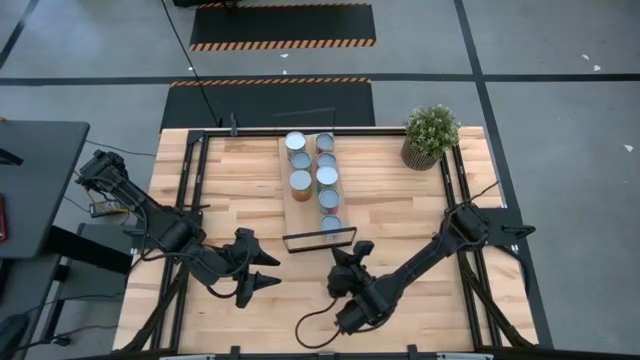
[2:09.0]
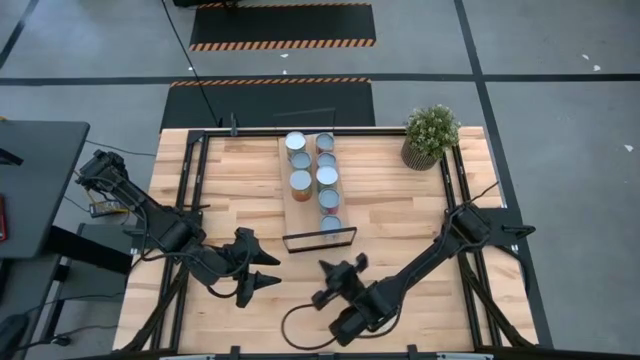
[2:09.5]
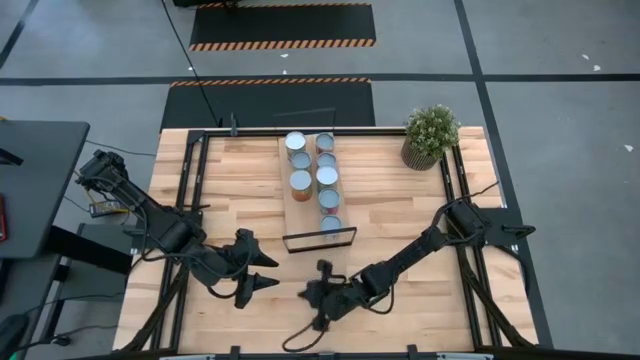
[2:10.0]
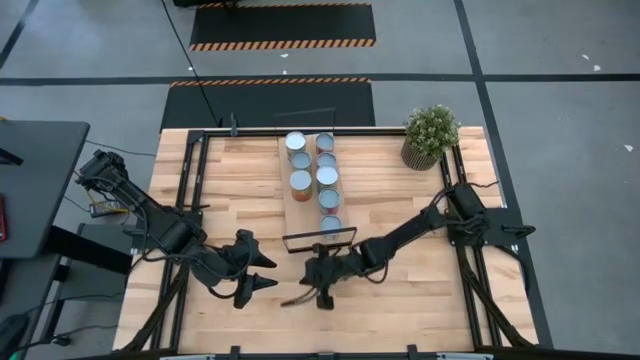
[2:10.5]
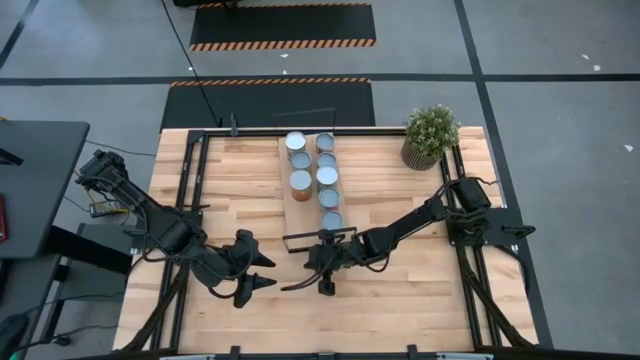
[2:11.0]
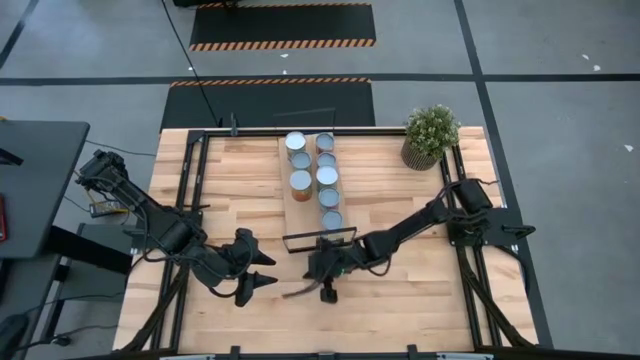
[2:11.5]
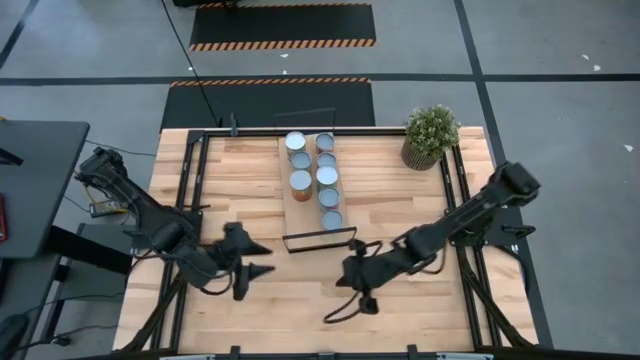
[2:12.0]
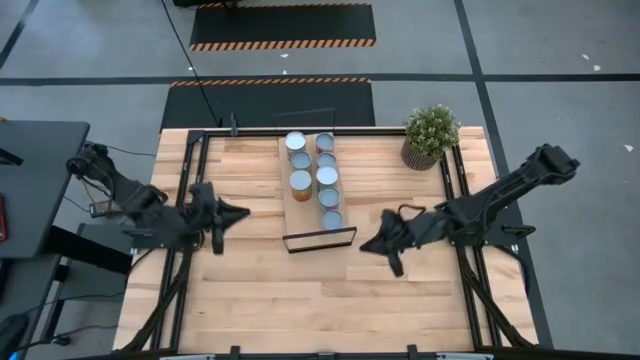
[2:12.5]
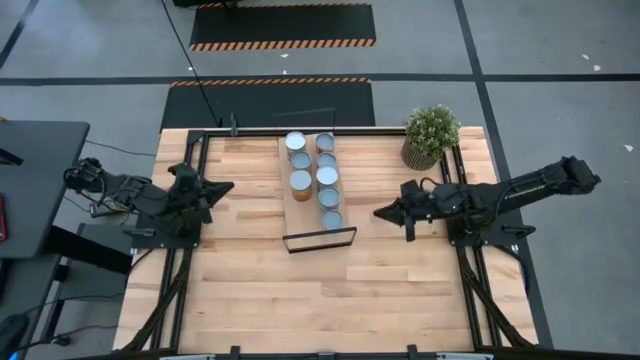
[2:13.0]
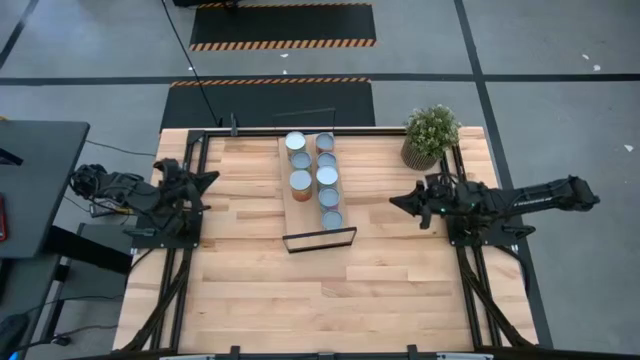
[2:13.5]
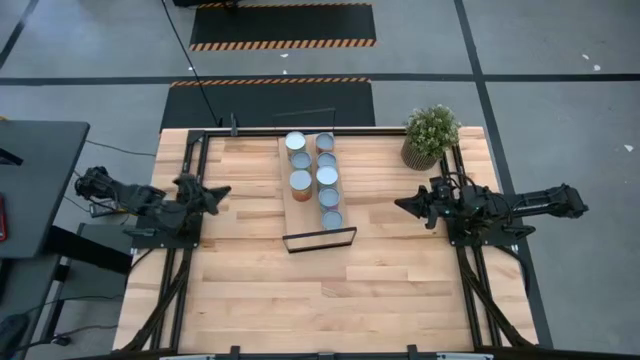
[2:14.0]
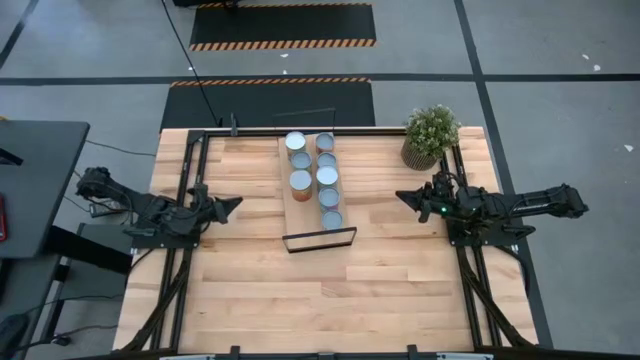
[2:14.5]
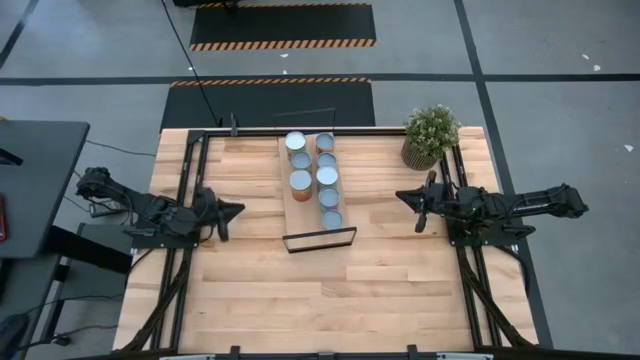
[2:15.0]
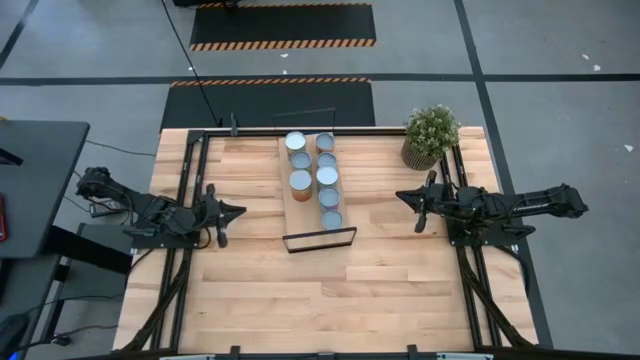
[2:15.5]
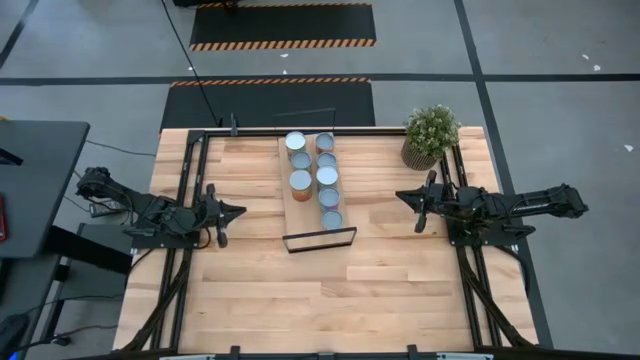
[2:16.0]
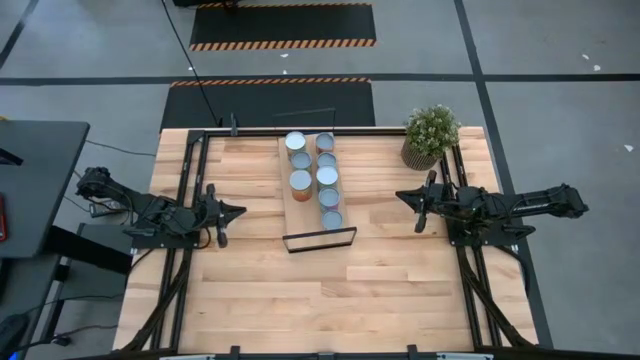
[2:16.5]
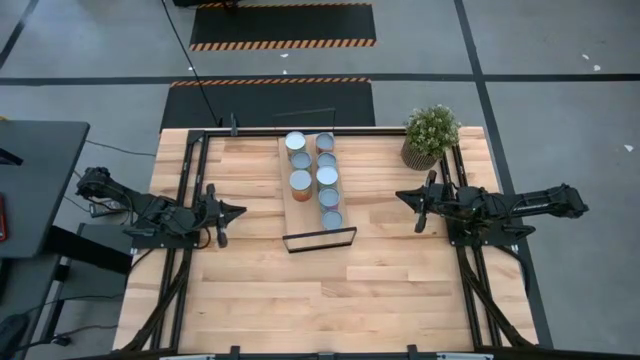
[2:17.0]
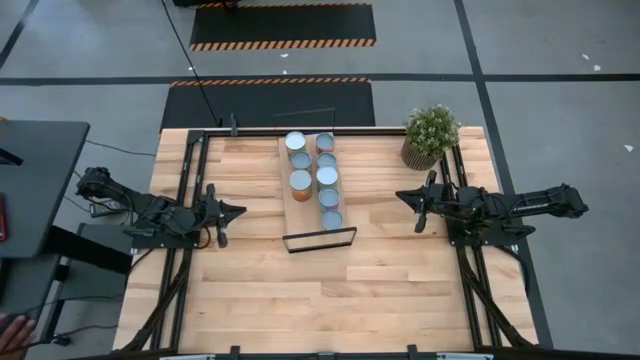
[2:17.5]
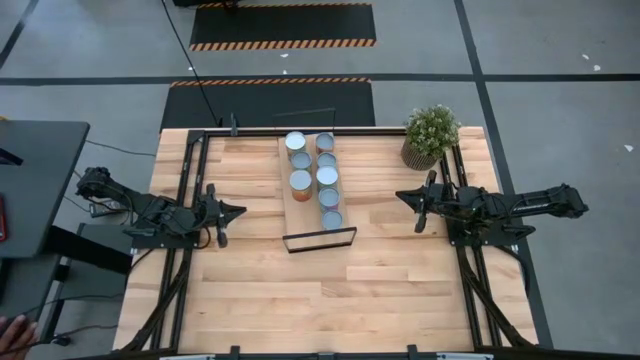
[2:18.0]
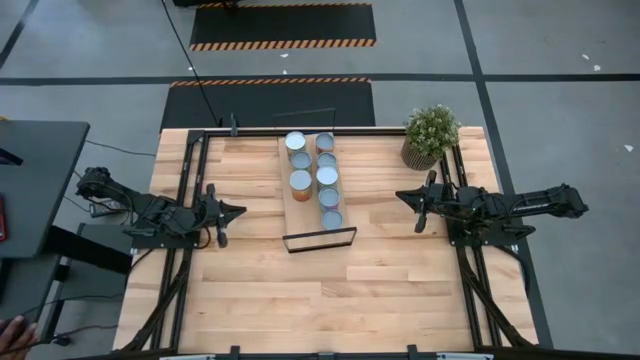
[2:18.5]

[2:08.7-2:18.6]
Task: Pick and place cans onto a shelf
Return to Home Position

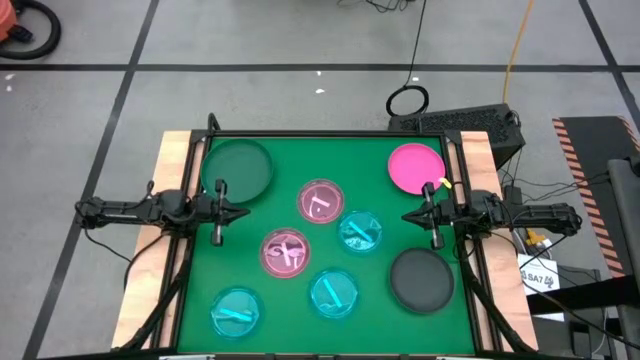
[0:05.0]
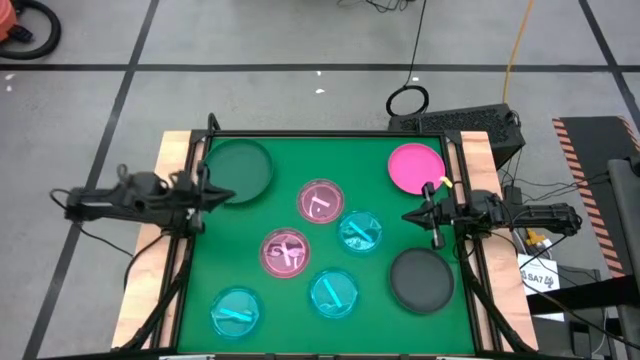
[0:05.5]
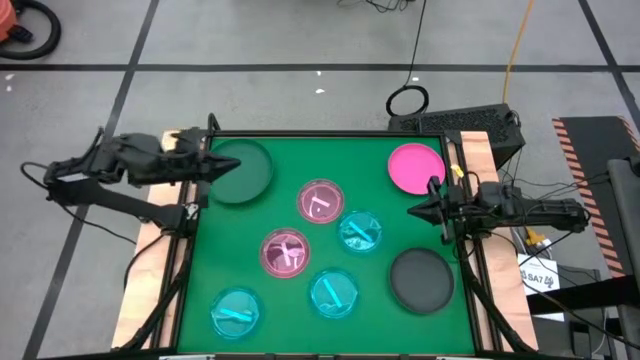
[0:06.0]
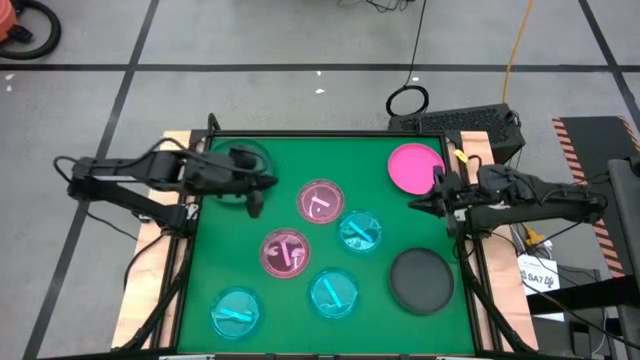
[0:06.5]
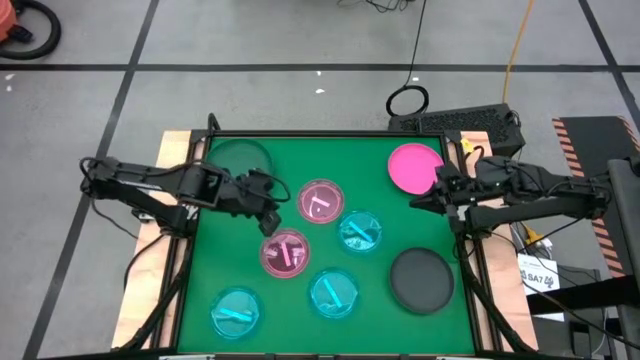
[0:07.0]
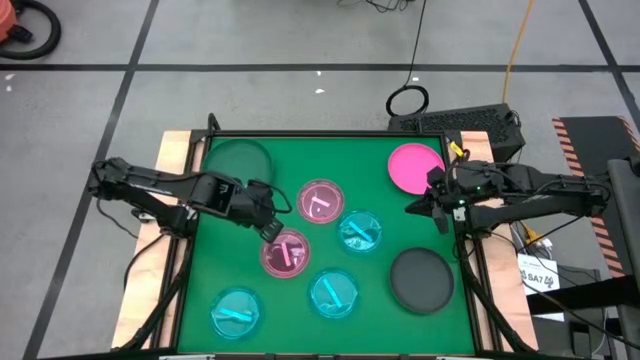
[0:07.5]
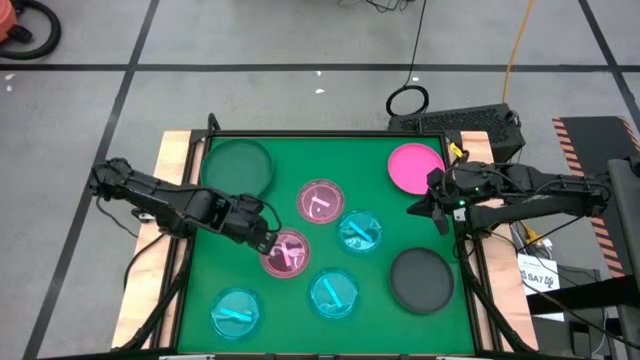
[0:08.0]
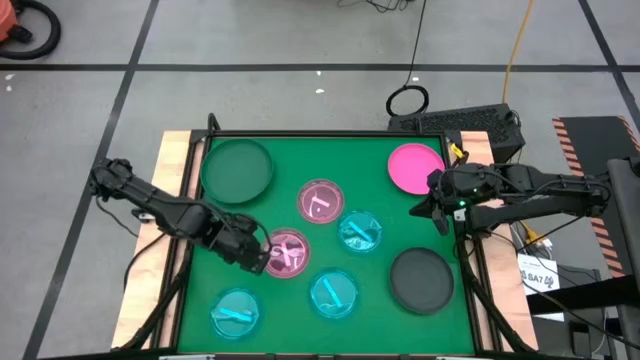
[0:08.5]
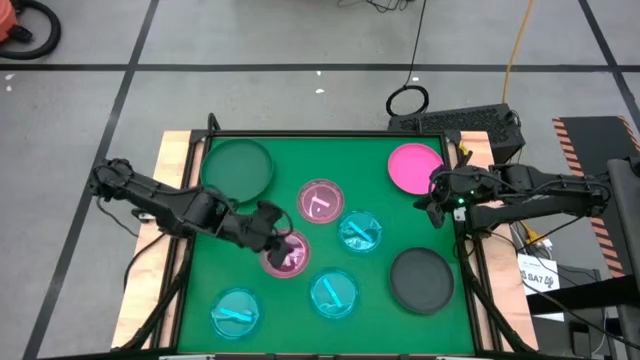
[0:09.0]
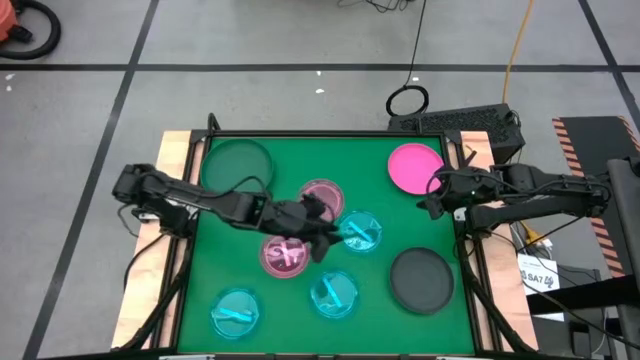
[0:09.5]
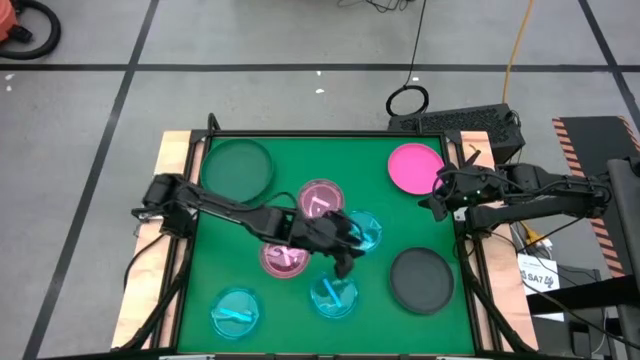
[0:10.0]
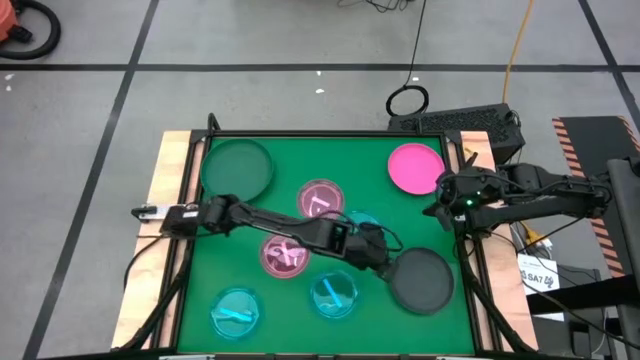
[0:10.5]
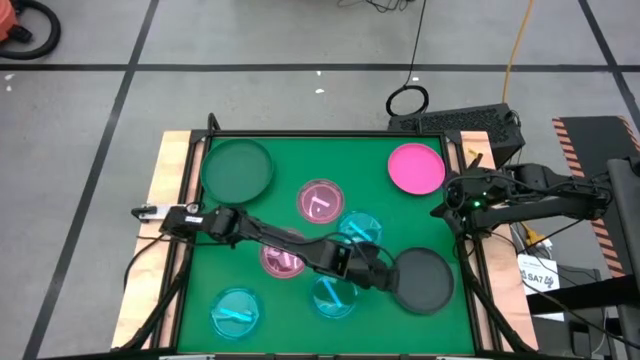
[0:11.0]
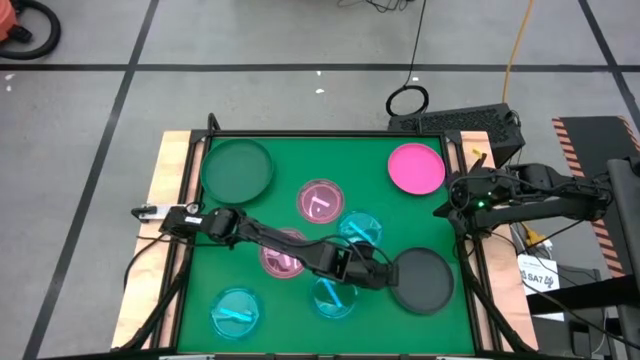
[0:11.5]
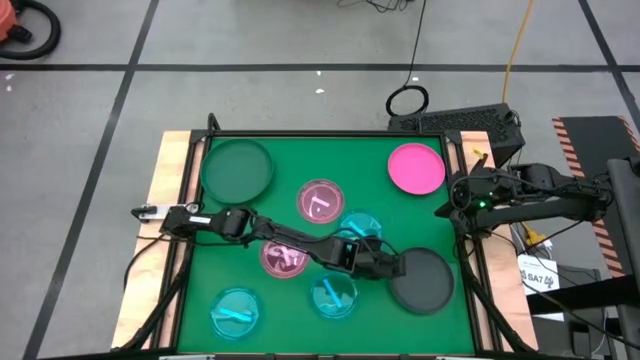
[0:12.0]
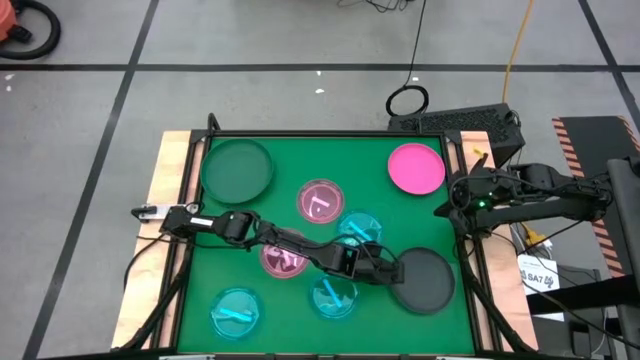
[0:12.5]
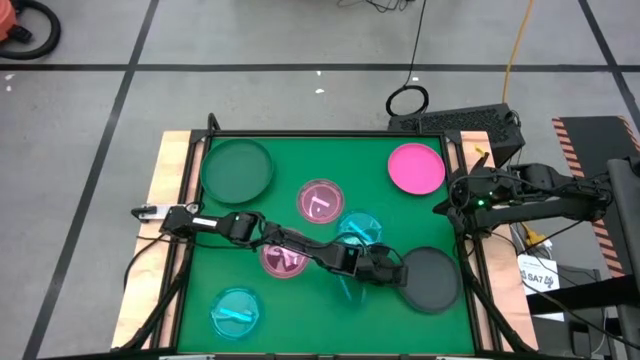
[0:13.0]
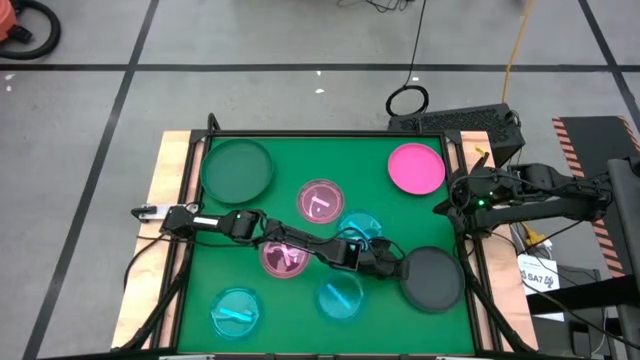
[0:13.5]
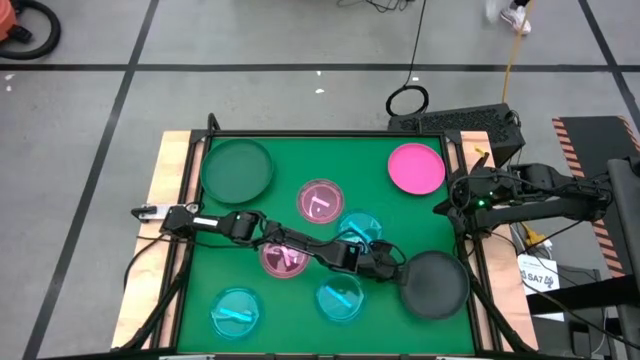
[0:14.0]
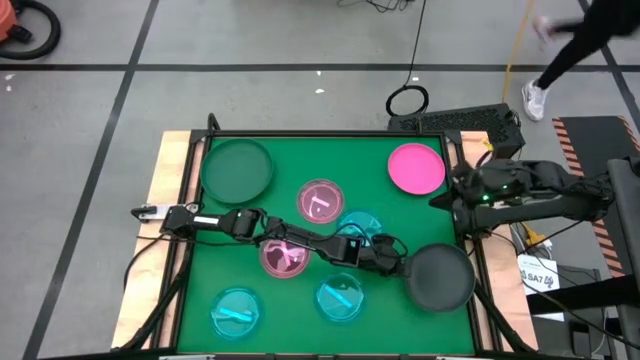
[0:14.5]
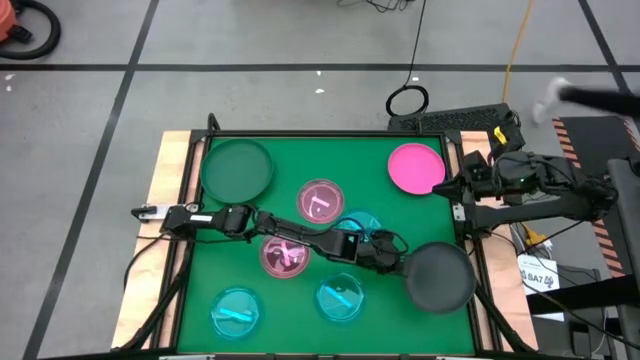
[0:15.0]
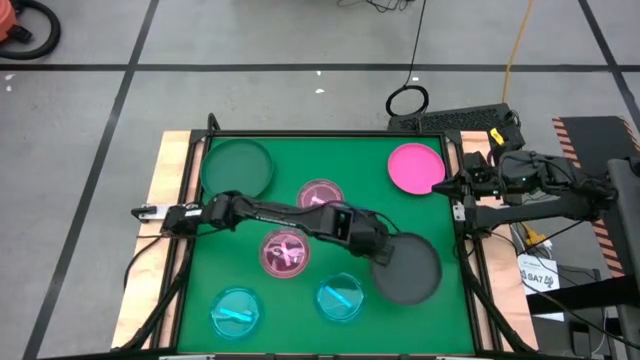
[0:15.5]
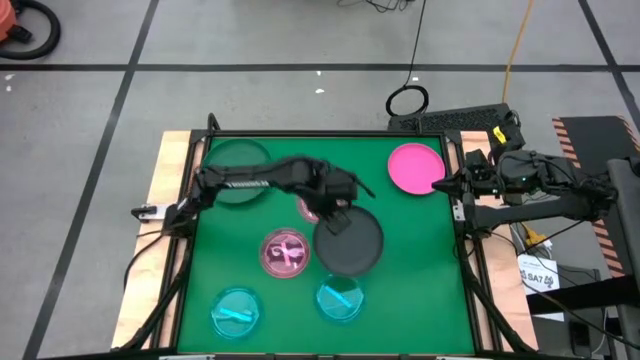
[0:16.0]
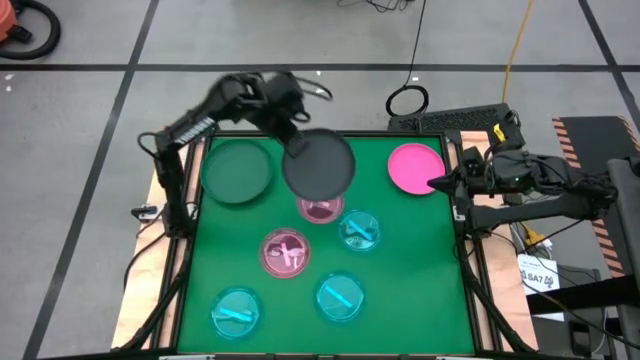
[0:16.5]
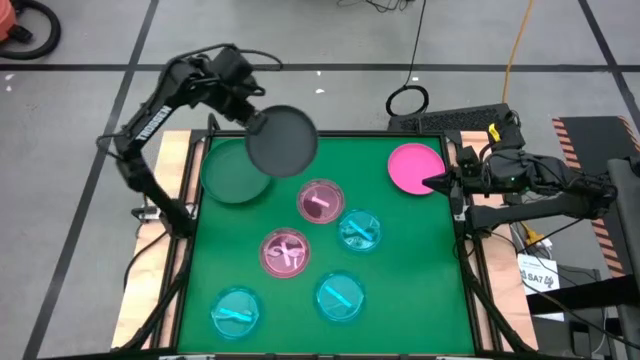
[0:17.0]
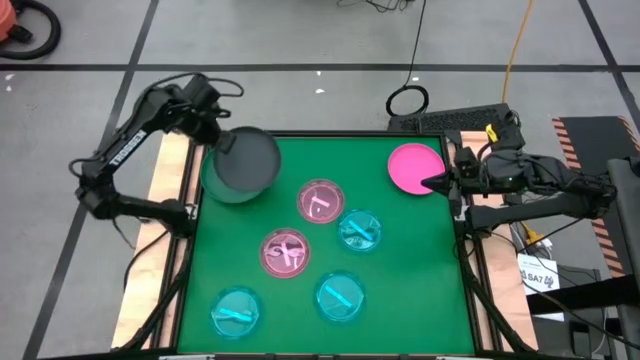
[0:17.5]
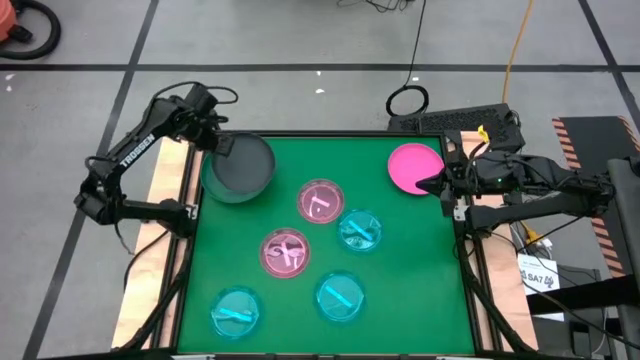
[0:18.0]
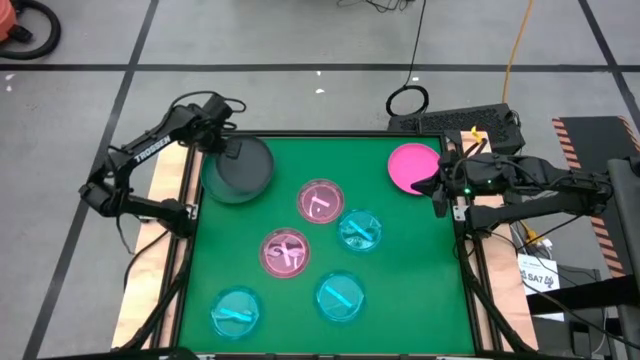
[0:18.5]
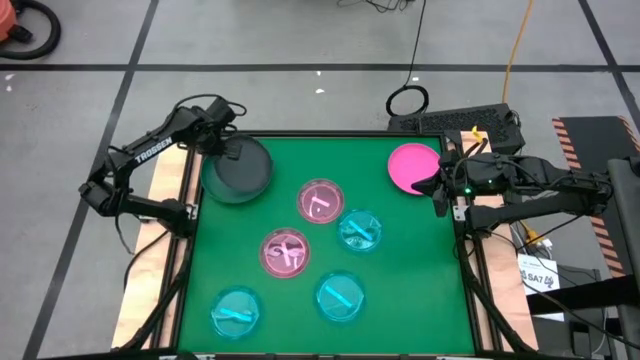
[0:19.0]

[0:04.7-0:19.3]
Task: Stack plastic plates
Stack the black plate on top of the dark green plate
